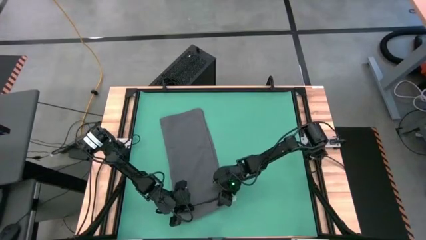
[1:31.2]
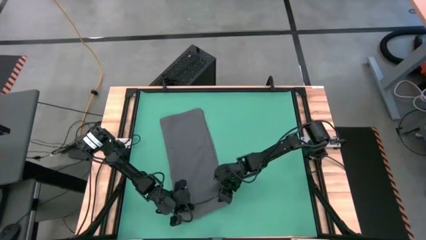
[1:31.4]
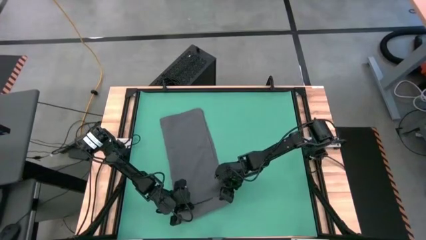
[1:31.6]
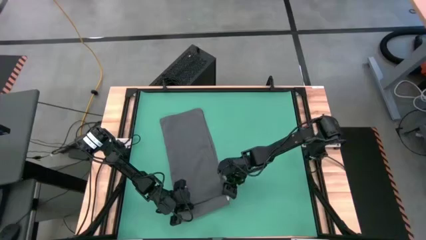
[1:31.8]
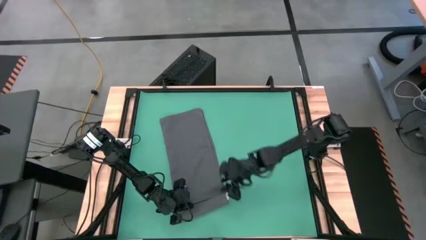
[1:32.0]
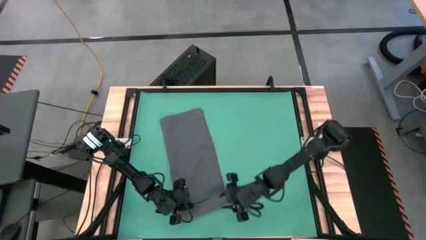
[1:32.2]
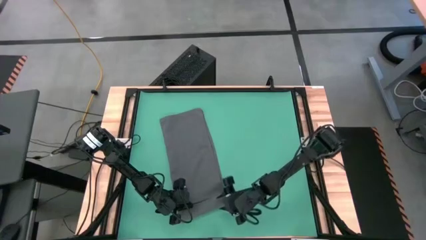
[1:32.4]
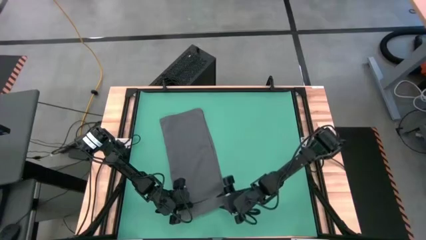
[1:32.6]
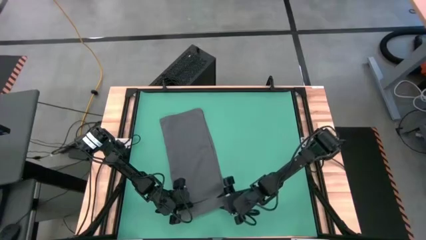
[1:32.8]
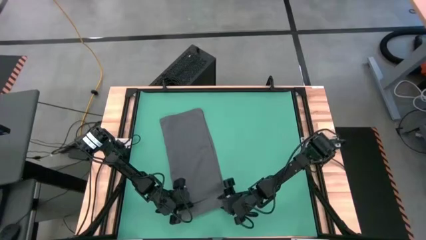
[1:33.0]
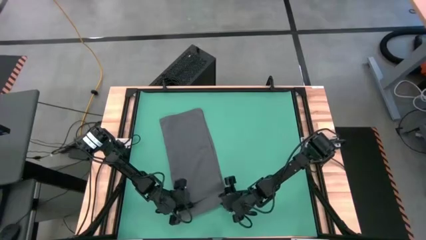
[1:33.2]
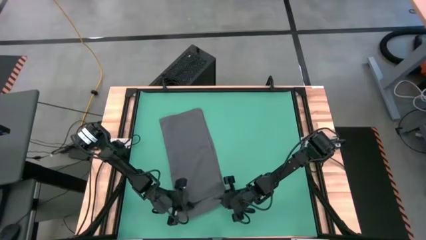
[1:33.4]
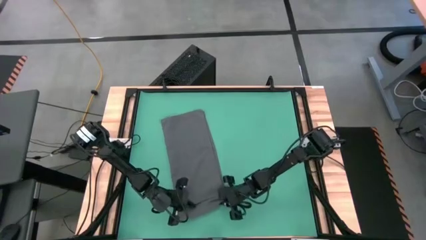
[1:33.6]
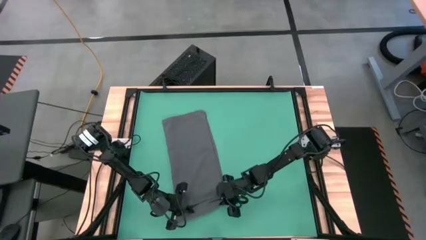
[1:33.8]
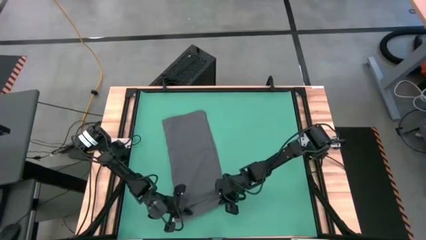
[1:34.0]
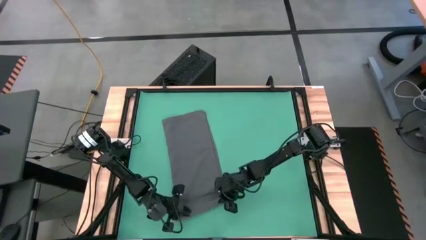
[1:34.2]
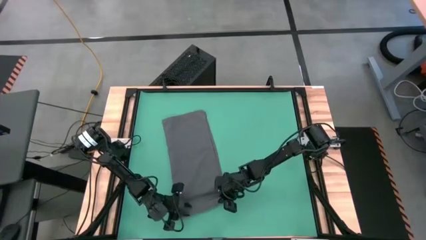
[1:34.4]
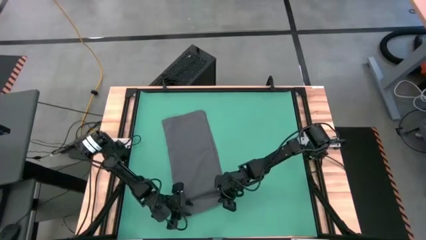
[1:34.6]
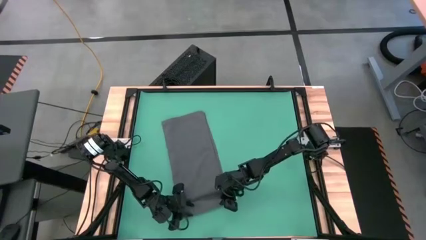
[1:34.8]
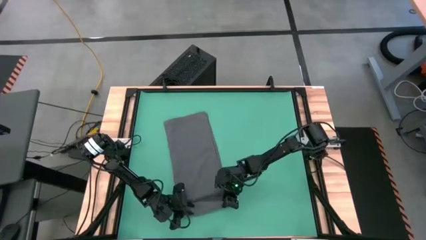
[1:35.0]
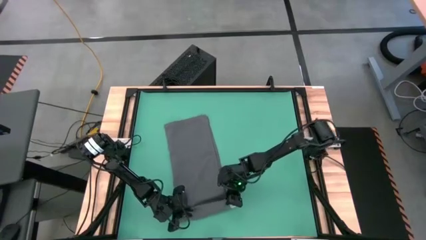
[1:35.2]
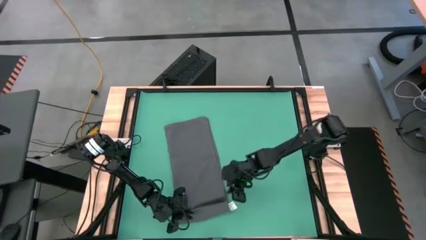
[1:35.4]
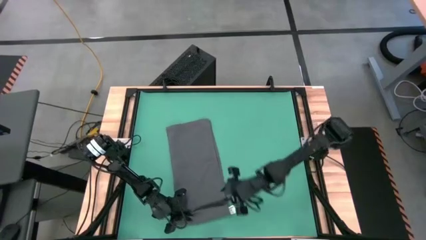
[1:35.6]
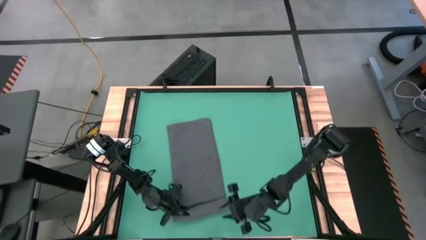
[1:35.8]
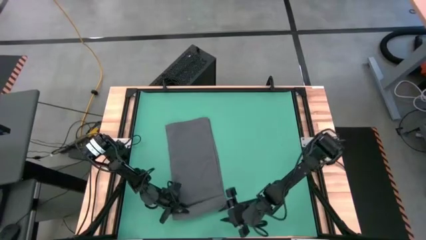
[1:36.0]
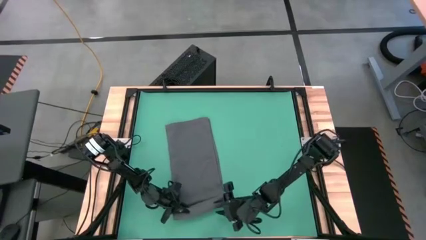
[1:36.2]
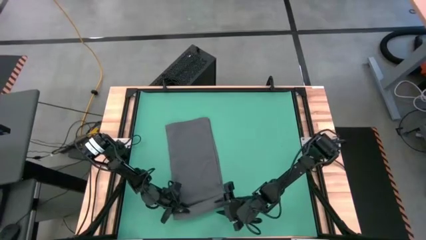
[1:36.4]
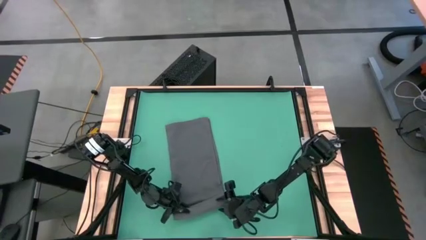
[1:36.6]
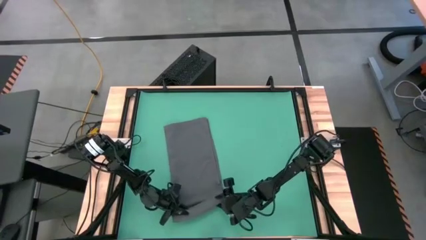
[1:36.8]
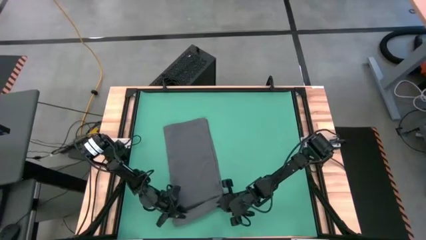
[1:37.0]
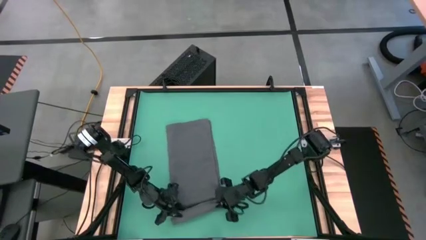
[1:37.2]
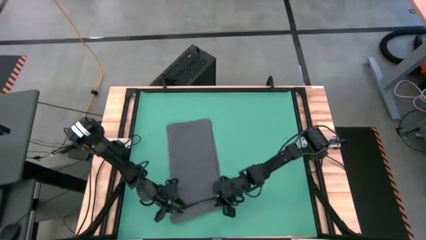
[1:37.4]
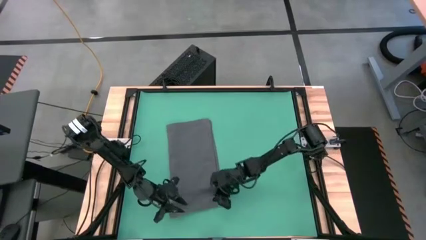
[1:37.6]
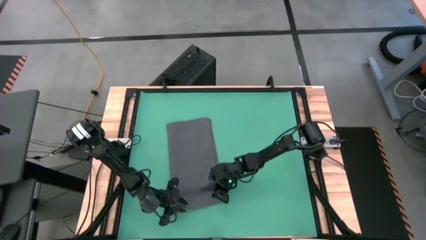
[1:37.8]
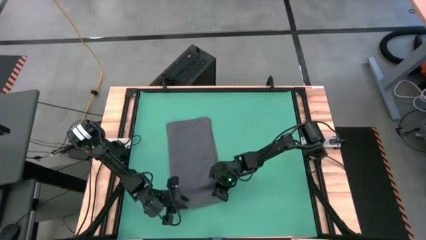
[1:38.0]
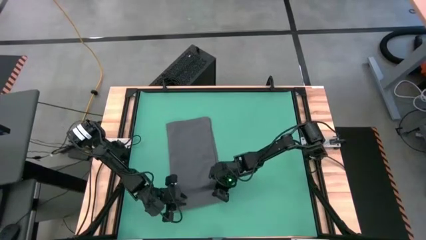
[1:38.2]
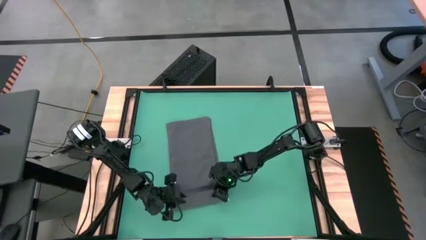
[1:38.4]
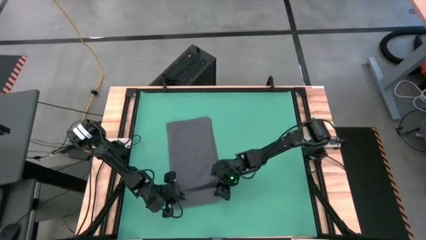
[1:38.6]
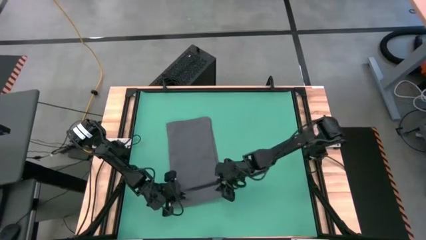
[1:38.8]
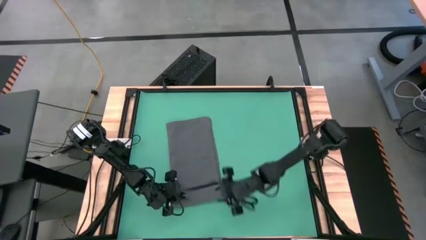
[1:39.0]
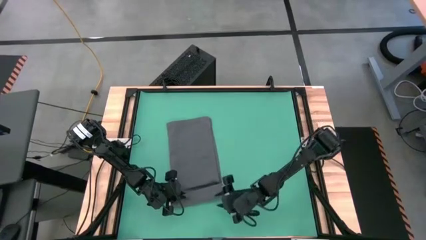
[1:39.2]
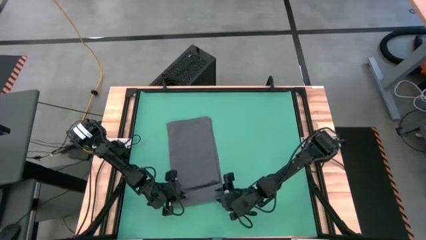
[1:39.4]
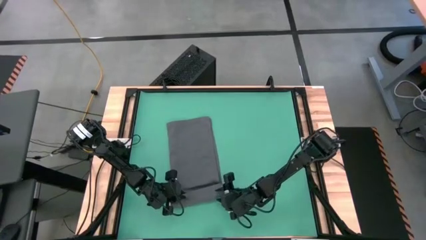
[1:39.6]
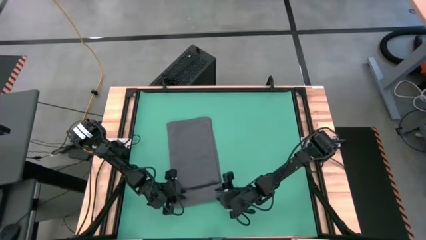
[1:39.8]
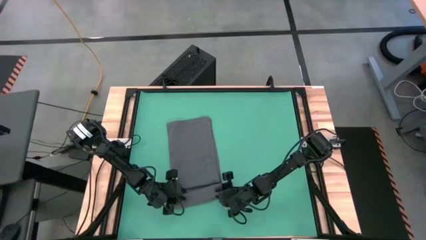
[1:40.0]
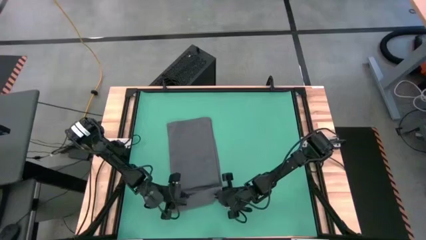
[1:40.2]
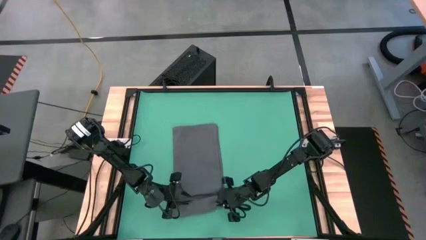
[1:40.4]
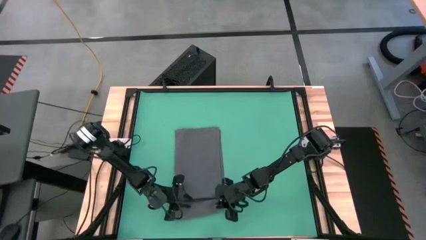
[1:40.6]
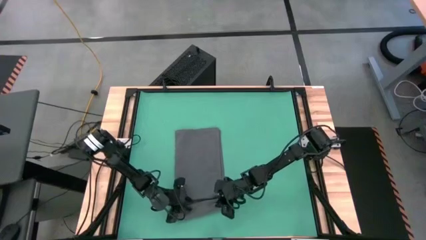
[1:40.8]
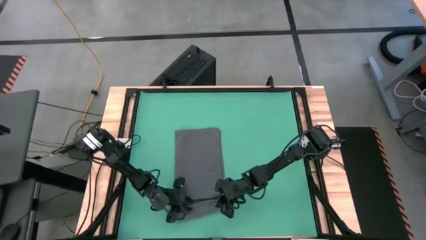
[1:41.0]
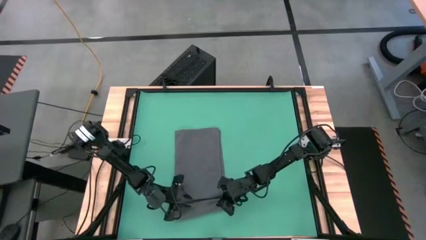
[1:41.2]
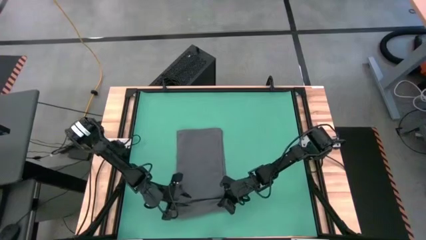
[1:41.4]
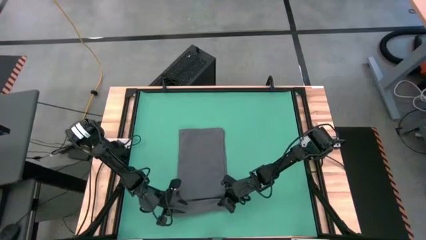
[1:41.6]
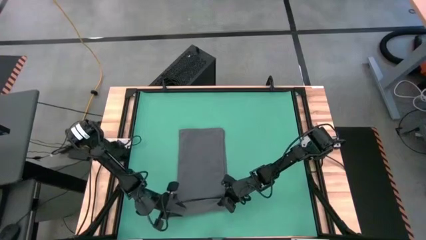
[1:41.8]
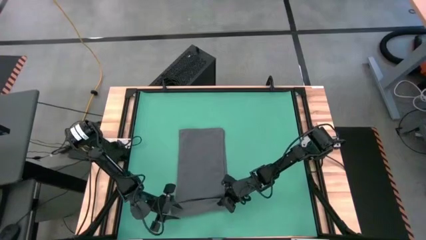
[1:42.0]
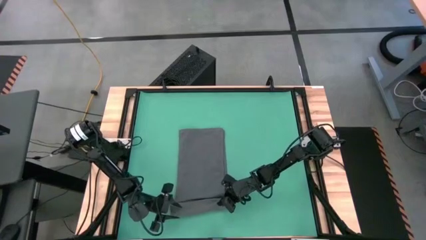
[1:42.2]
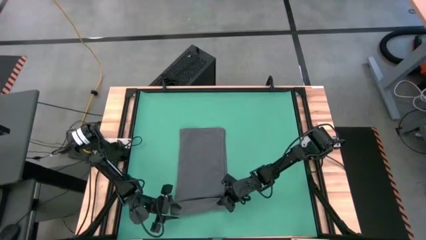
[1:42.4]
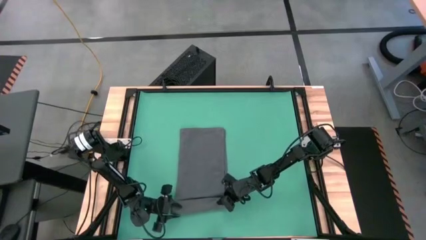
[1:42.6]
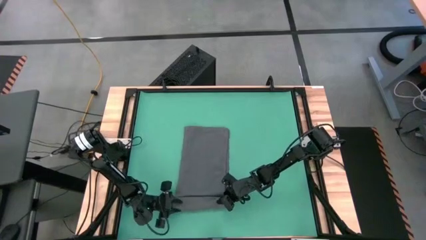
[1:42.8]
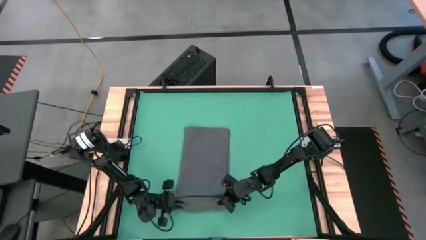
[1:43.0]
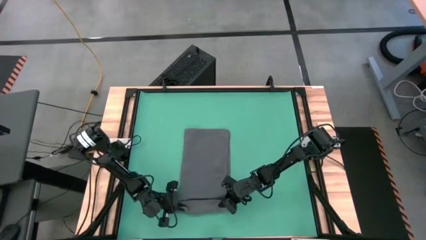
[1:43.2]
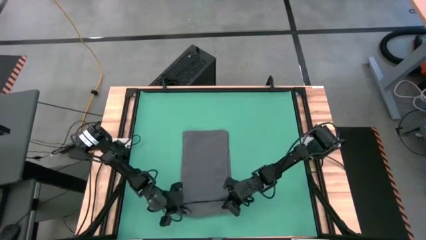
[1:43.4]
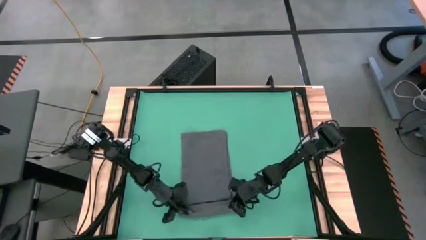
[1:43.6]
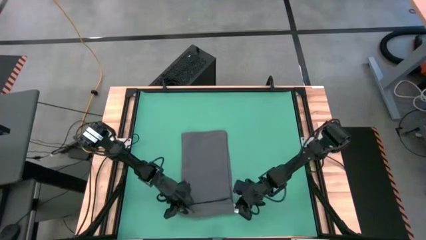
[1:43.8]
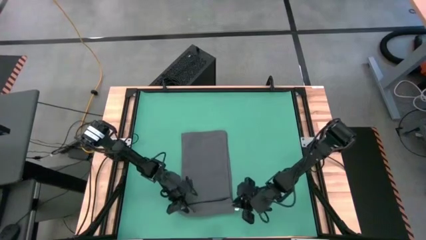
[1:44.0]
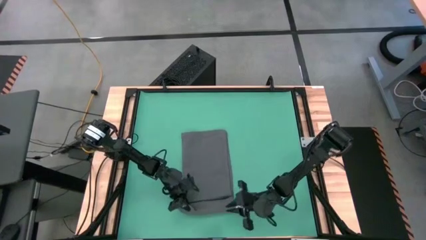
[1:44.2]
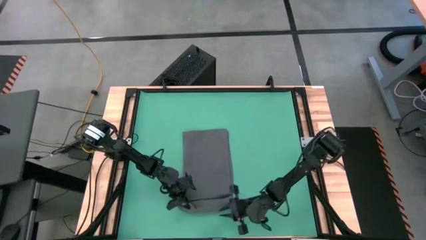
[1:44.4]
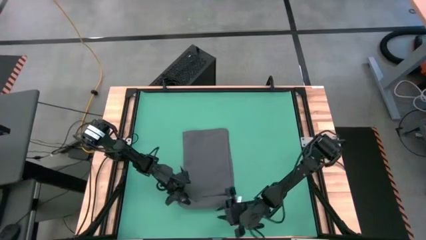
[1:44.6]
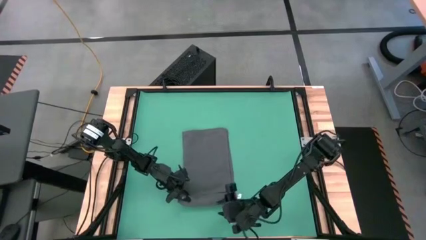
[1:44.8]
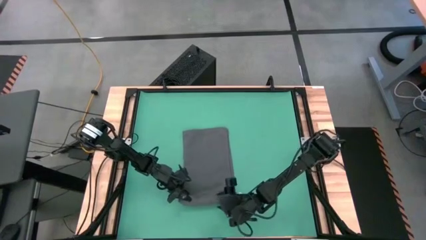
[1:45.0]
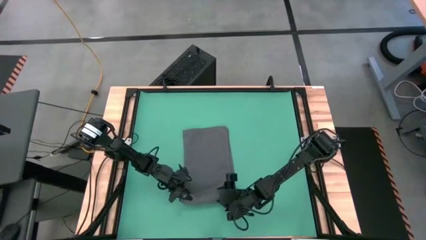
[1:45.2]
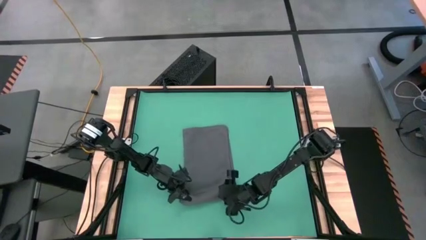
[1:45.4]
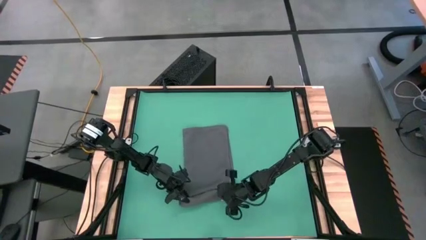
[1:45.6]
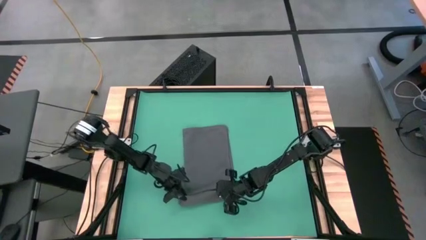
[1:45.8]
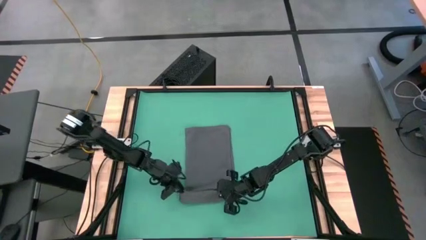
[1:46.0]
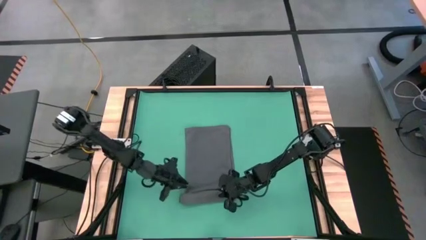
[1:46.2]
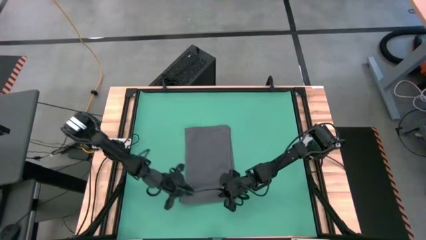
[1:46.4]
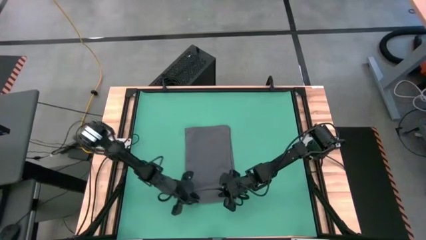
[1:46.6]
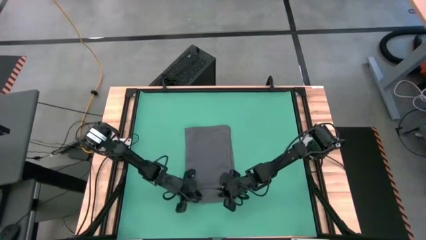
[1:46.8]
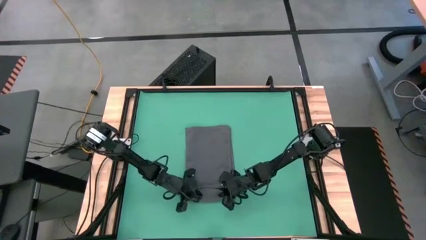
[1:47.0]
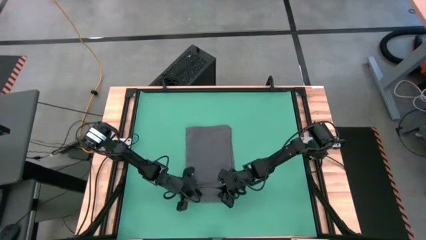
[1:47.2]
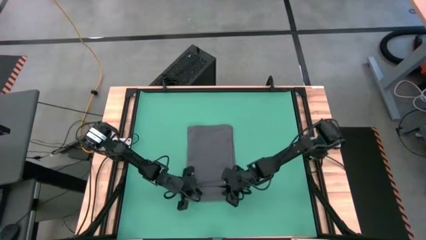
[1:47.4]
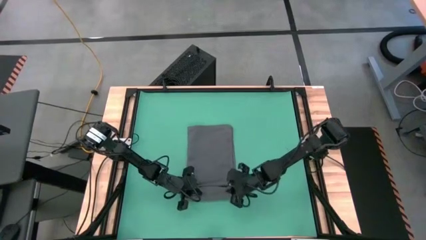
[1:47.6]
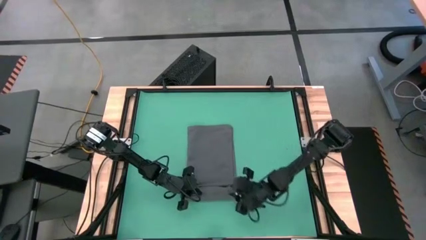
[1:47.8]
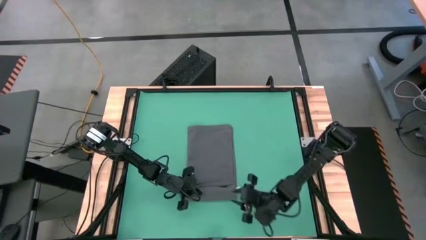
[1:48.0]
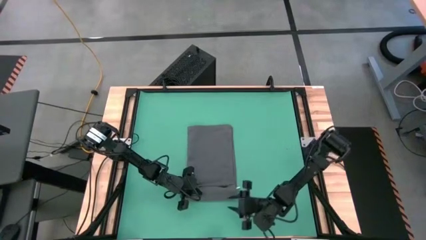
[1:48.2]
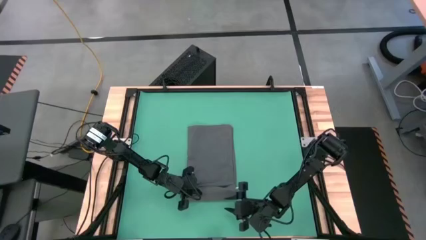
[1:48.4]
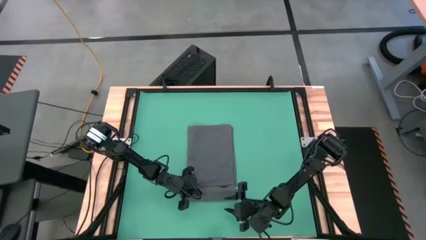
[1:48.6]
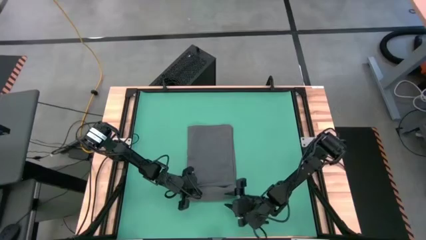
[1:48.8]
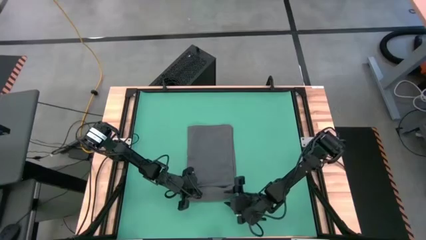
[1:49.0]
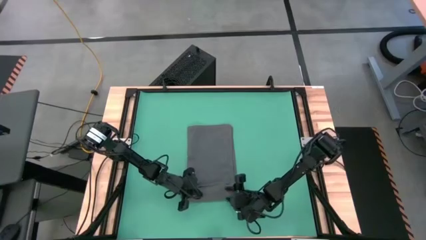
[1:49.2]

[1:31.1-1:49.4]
Task: Roll towel into tight, uniform cylinder
Roll the gray towel
